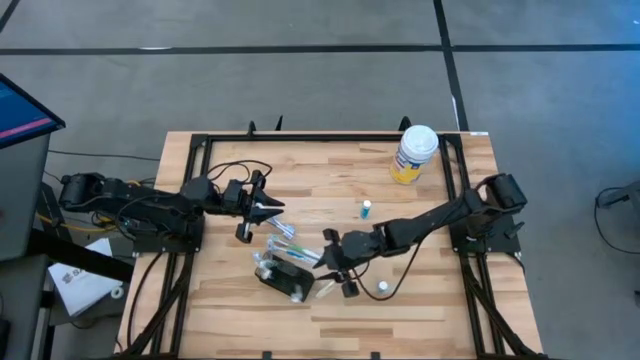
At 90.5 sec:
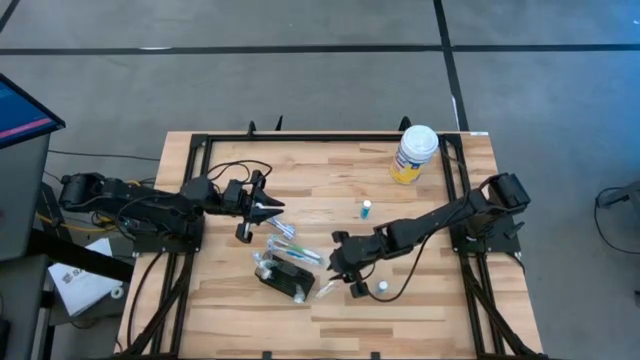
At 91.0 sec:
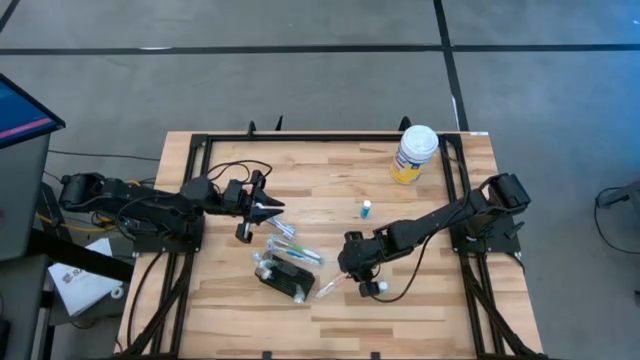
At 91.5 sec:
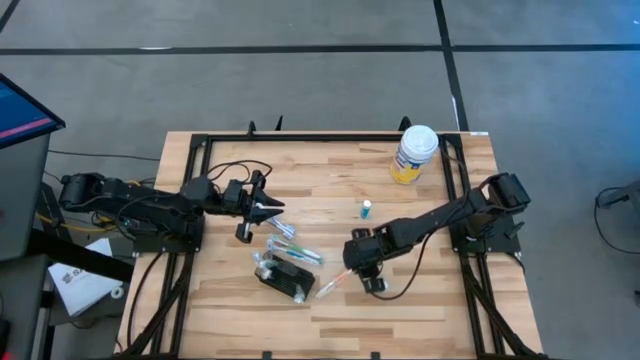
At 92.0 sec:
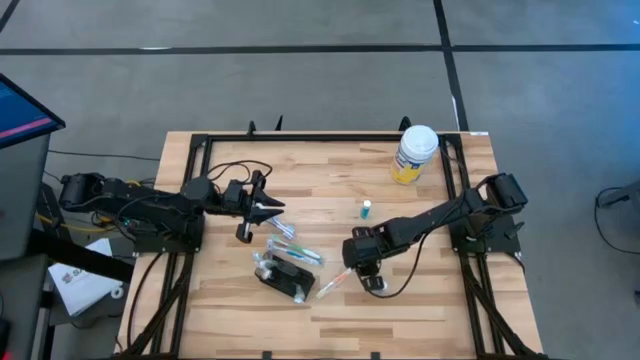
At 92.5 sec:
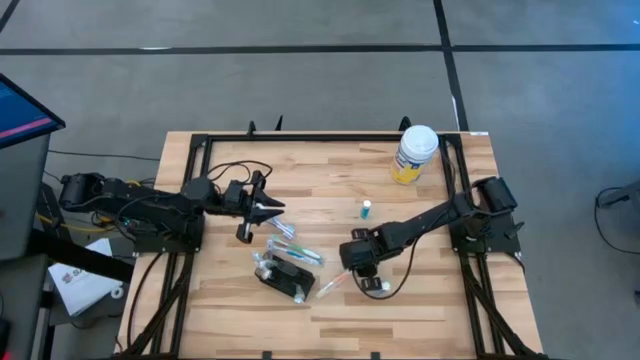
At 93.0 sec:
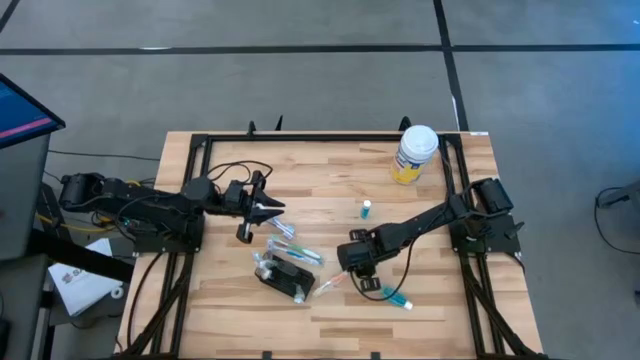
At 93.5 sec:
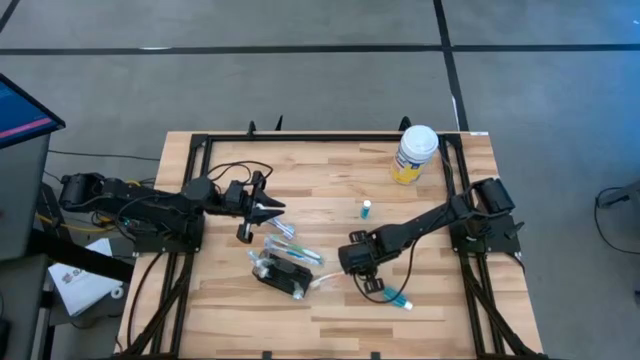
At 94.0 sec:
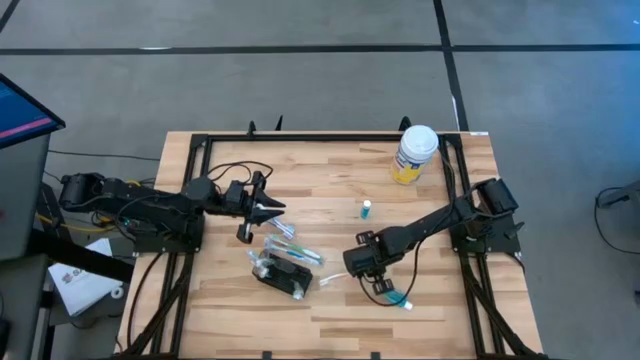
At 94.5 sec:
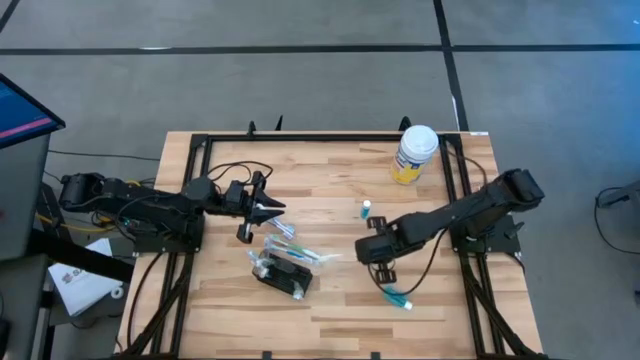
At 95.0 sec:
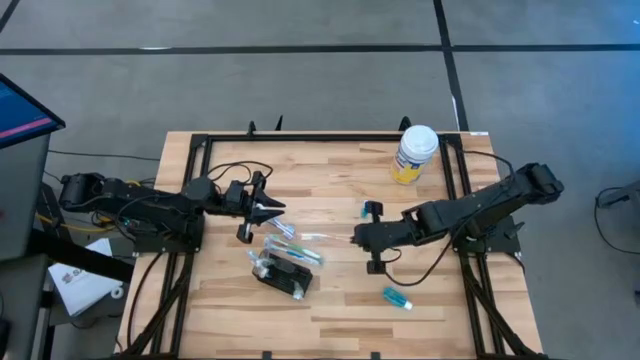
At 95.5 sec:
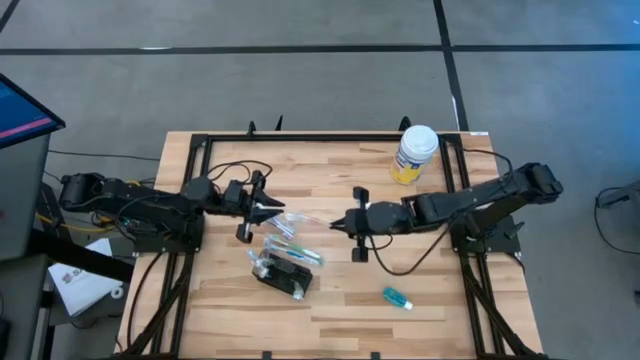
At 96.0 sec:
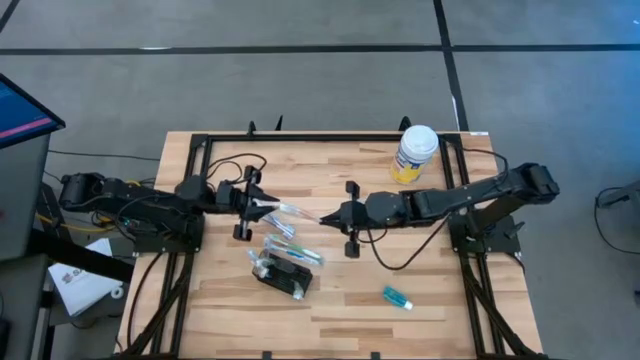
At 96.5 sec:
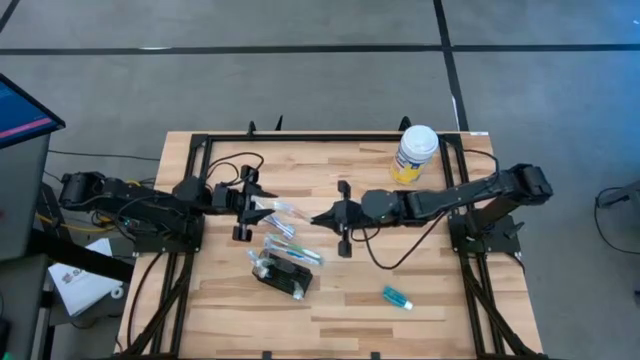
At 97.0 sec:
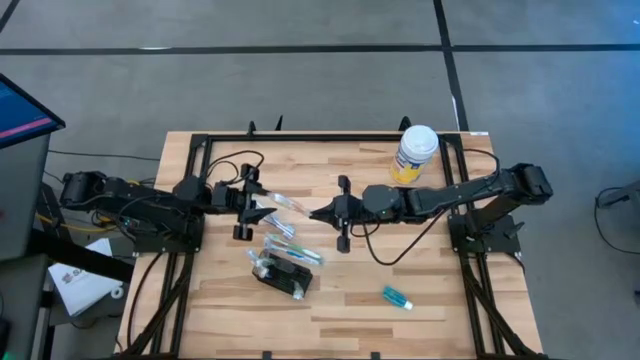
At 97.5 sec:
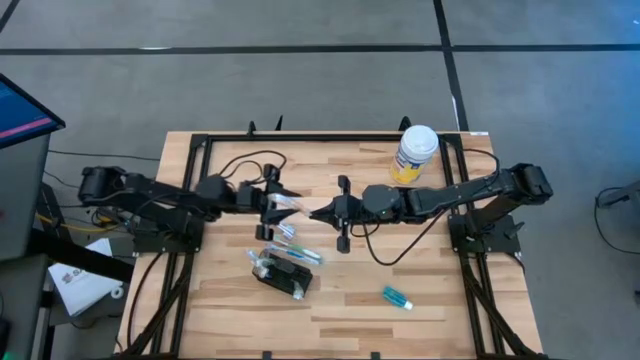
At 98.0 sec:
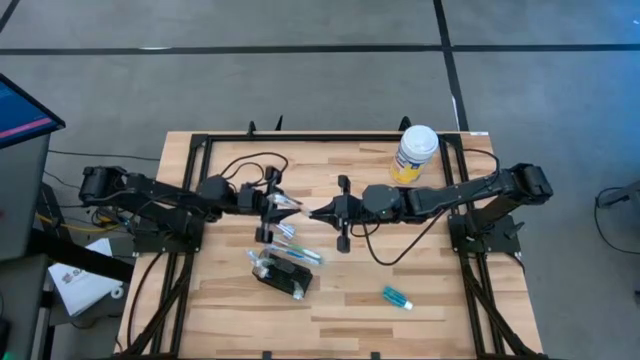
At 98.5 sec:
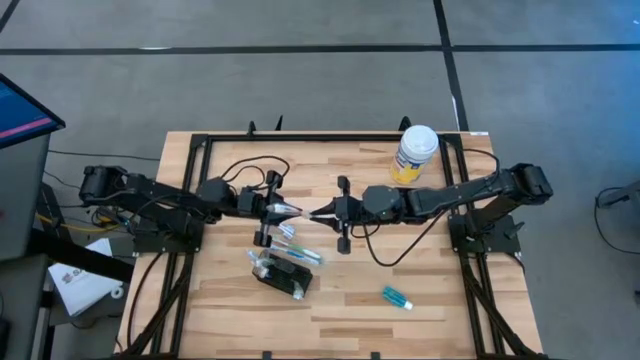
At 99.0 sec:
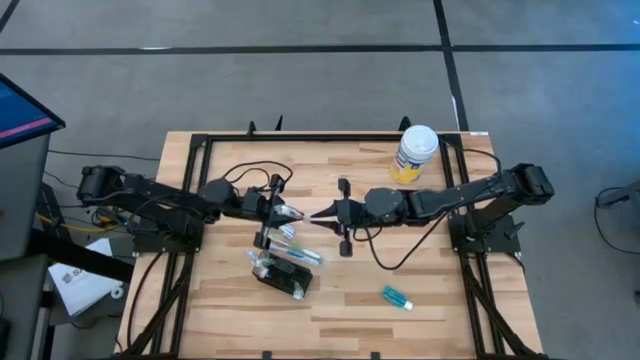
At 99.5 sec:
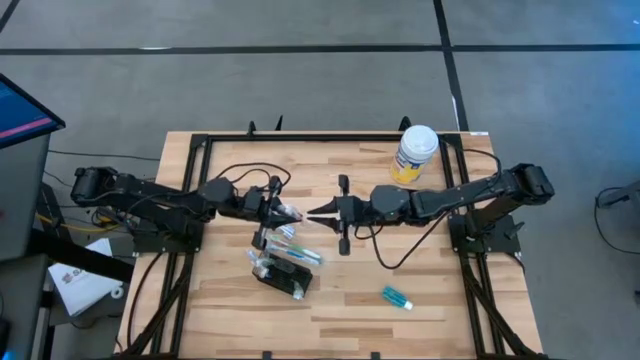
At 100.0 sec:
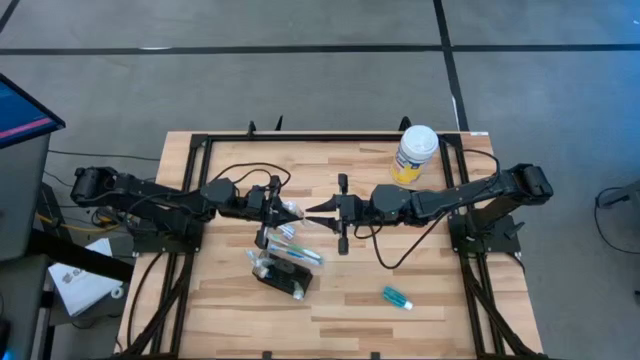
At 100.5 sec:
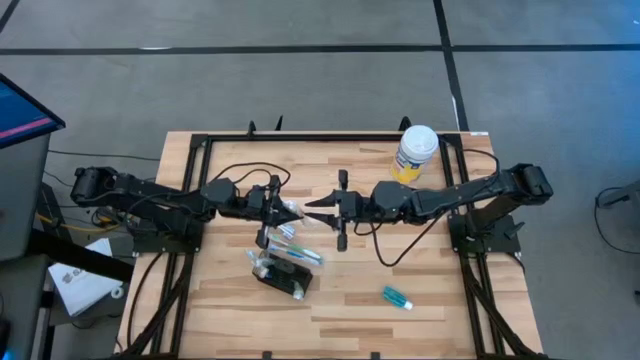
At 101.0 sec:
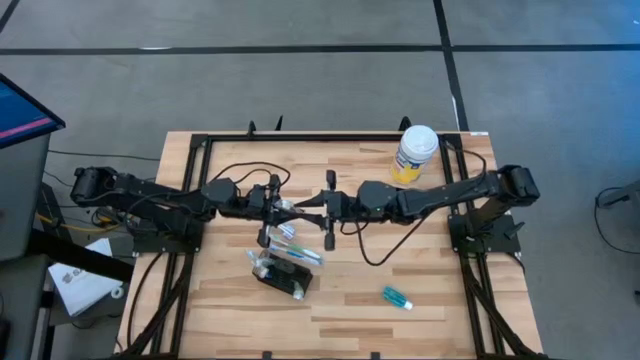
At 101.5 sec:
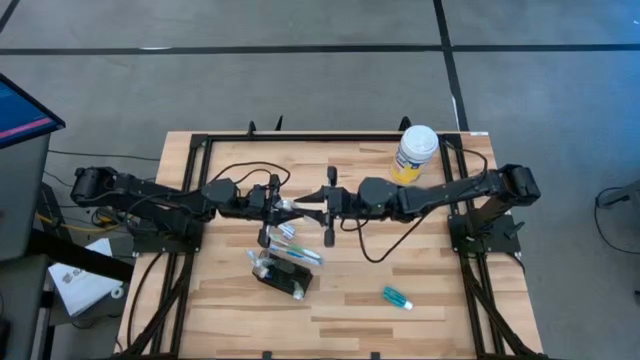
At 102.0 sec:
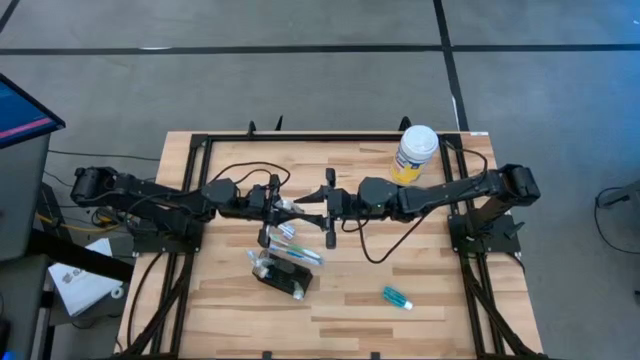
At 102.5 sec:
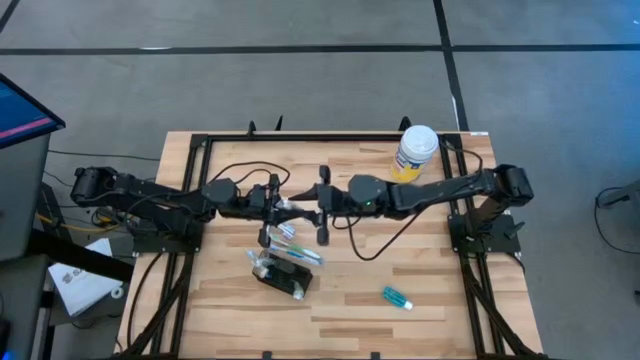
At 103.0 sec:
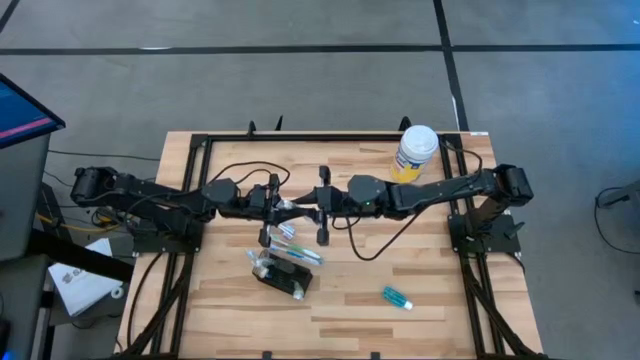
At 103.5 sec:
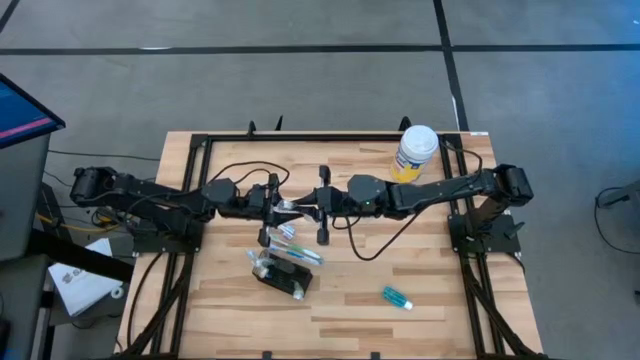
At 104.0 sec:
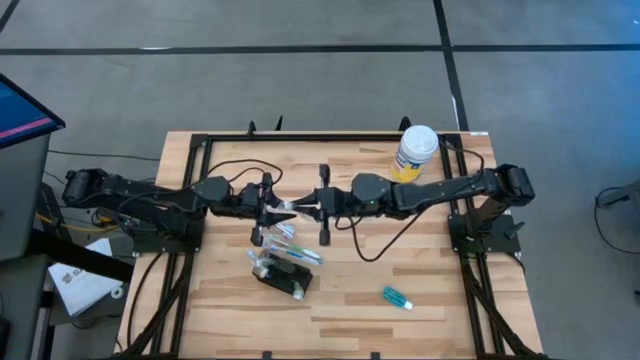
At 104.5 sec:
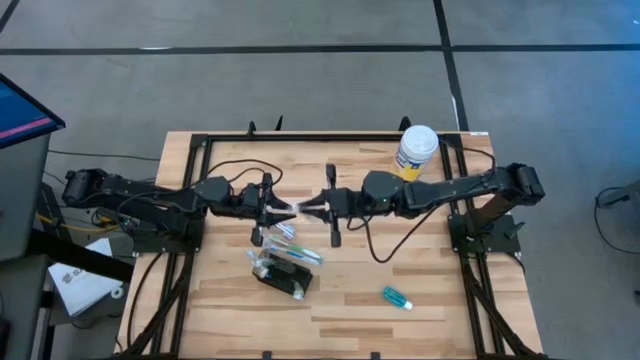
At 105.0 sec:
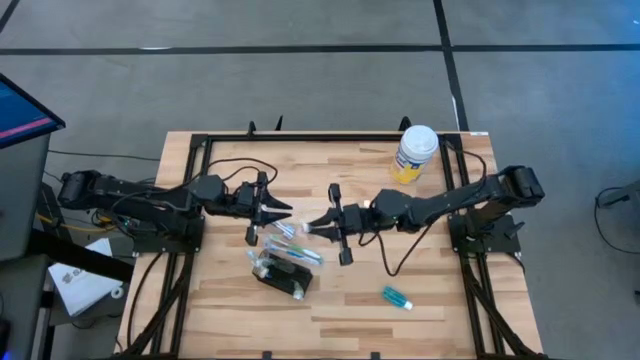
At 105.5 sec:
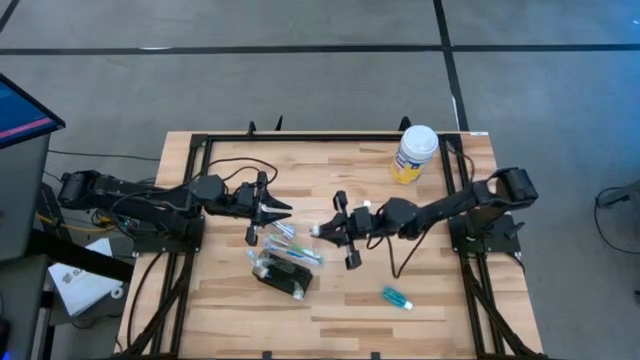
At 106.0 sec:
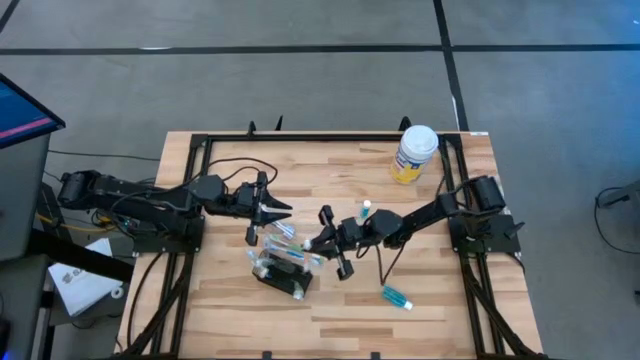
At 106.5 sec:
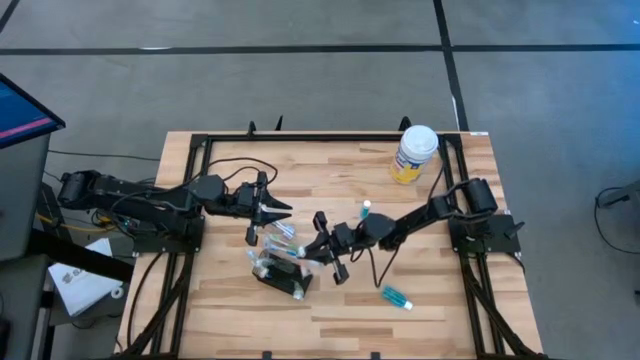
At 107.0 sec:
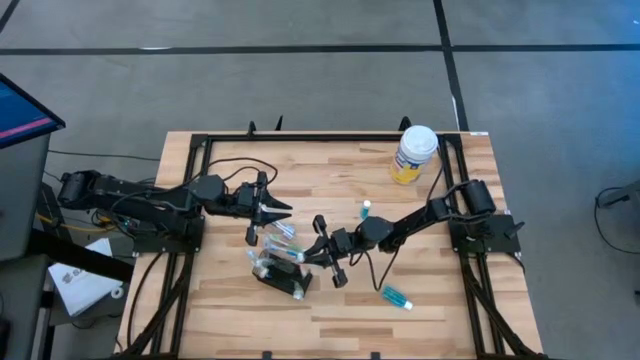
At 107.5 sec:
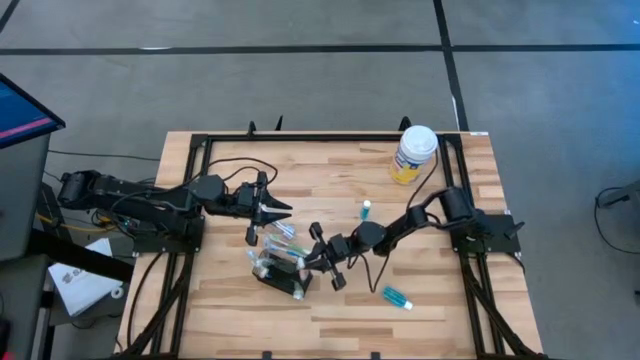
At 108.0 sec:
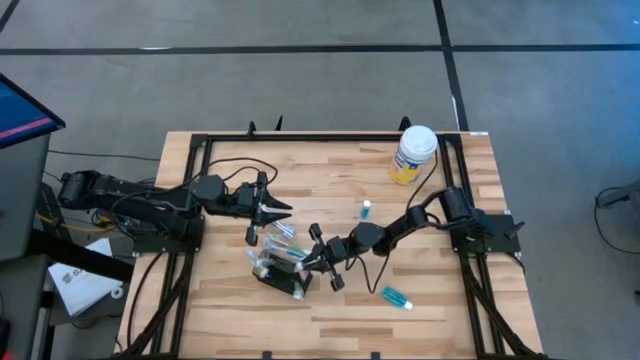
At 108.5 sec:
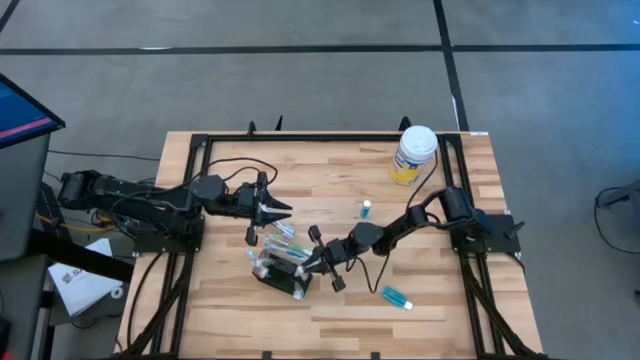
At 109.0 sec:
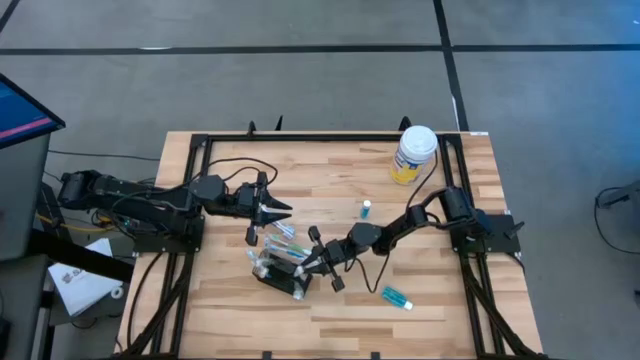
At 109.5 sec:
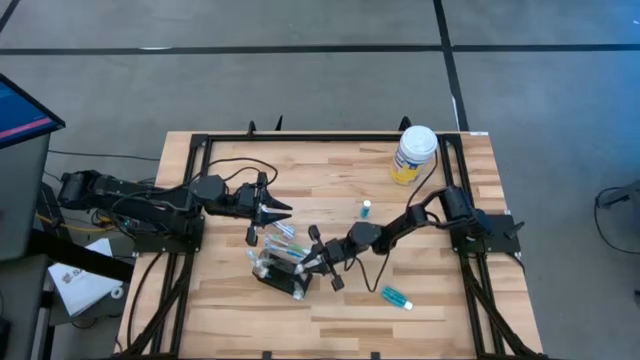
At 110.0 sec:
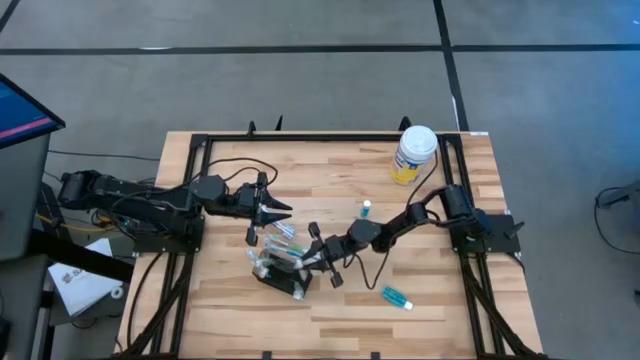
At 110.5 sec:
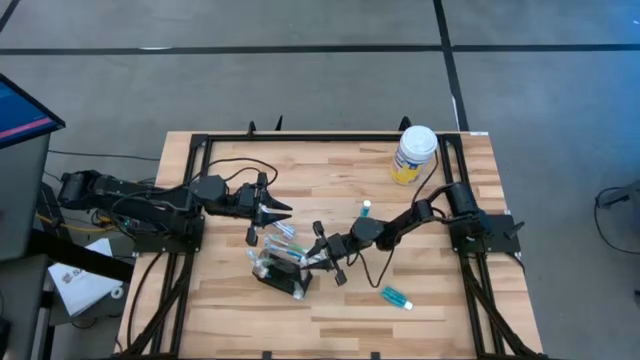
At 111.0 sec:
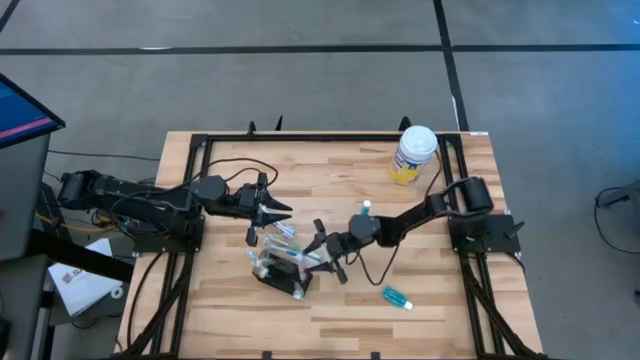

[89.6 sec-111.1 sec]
Task: Pick & Place toothbrushing station
Put the orange toothbrush into the mesh organizer
